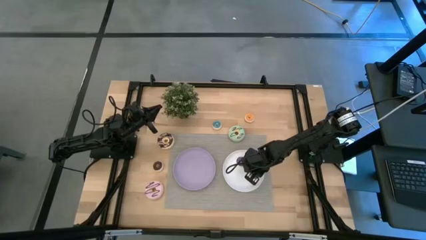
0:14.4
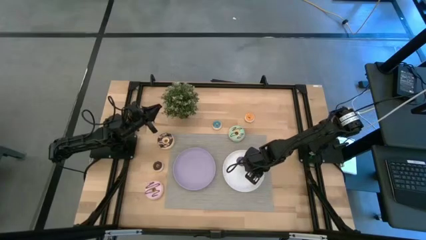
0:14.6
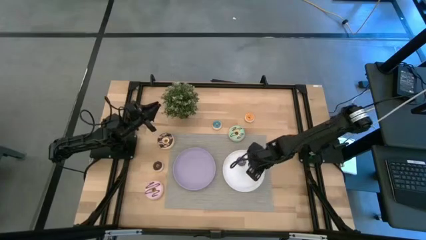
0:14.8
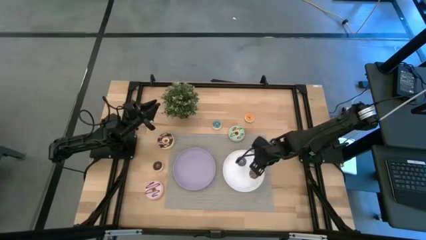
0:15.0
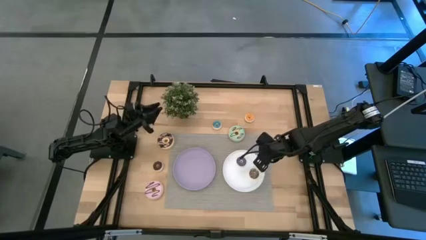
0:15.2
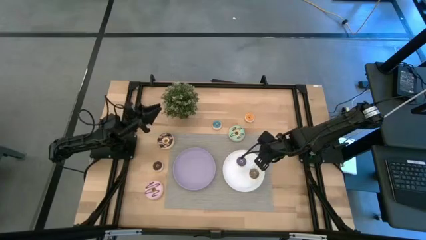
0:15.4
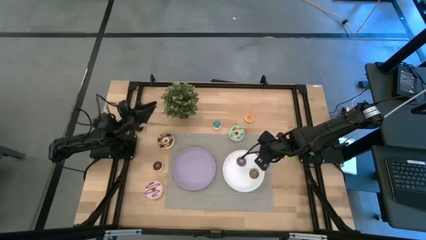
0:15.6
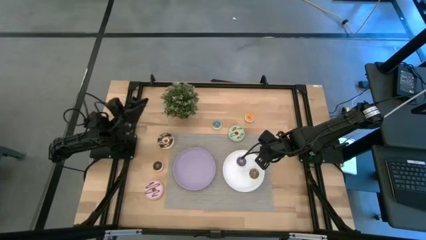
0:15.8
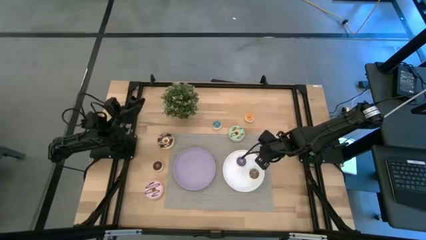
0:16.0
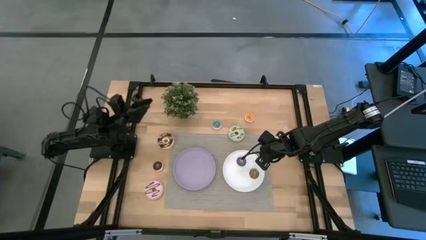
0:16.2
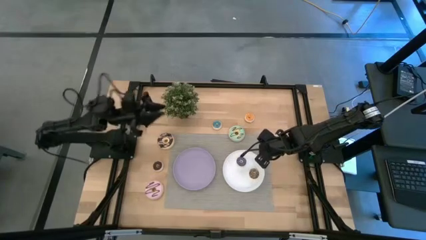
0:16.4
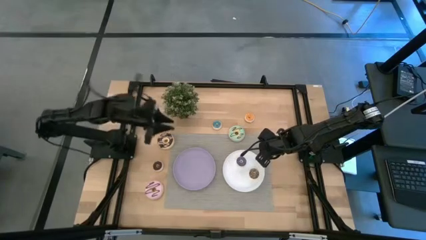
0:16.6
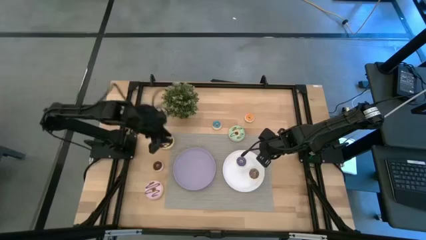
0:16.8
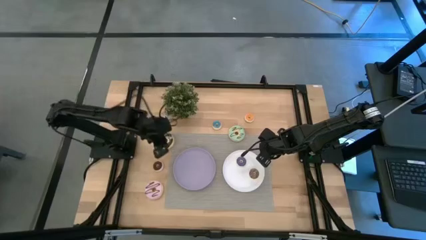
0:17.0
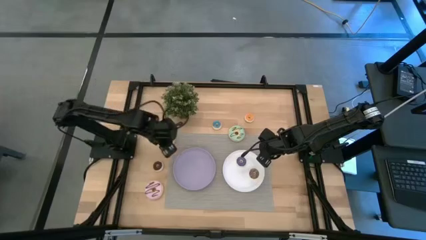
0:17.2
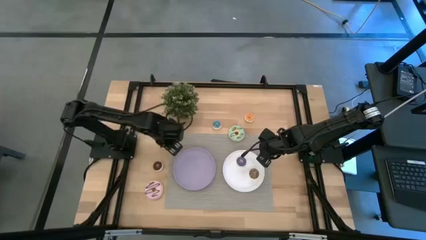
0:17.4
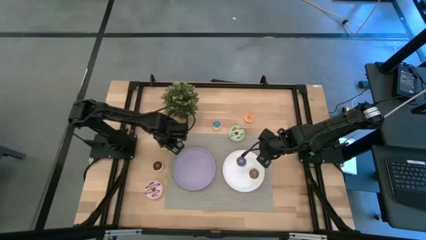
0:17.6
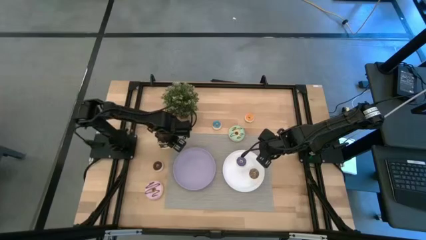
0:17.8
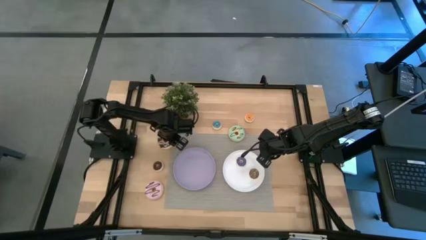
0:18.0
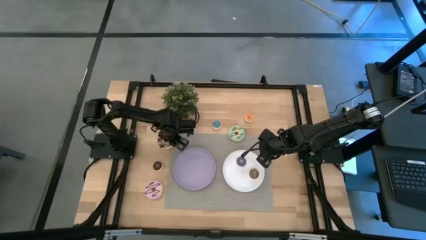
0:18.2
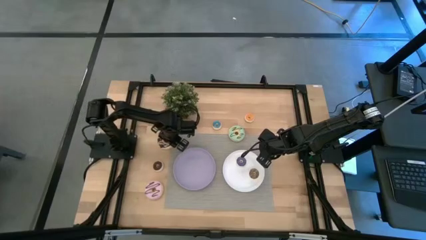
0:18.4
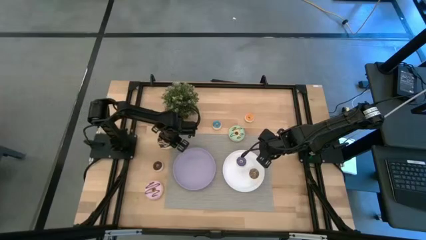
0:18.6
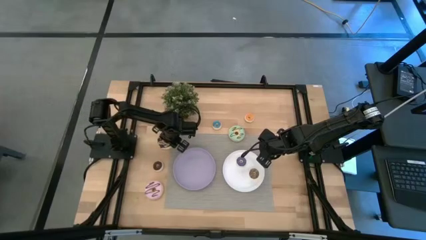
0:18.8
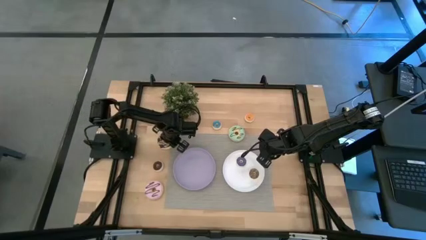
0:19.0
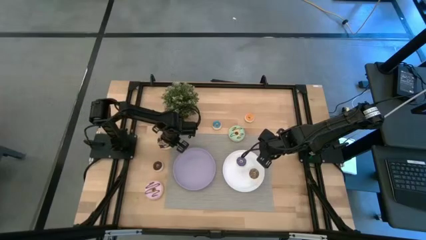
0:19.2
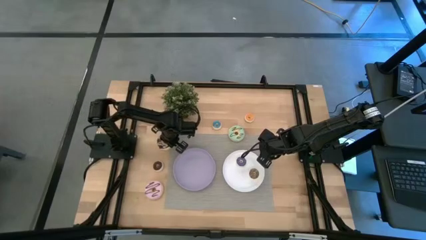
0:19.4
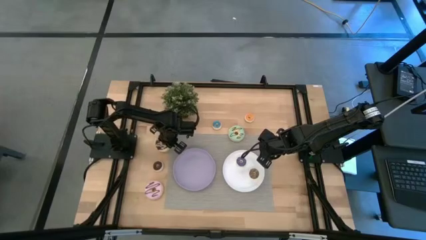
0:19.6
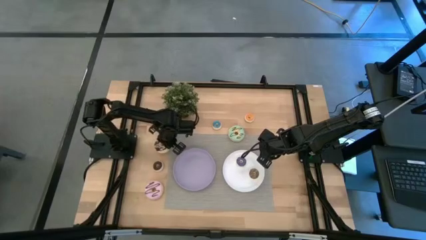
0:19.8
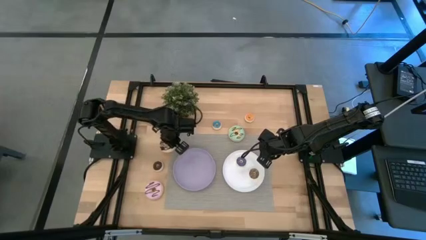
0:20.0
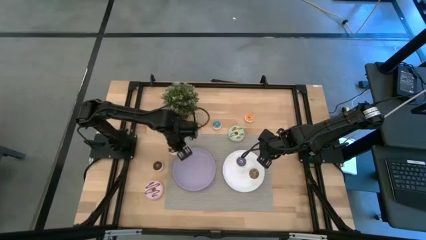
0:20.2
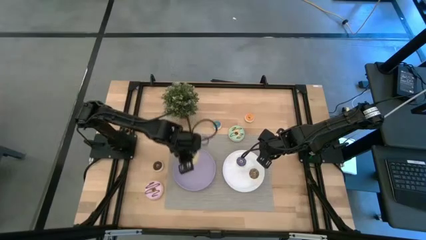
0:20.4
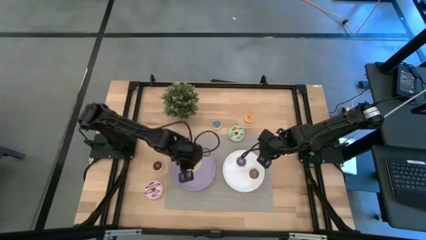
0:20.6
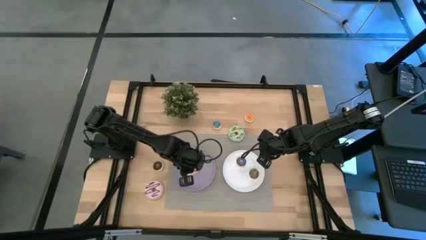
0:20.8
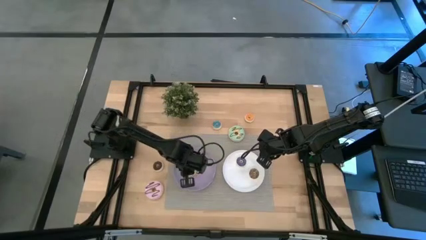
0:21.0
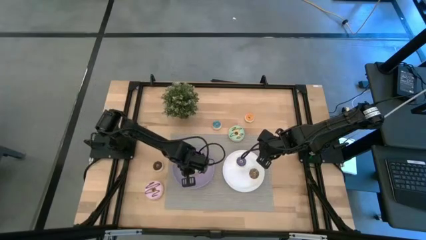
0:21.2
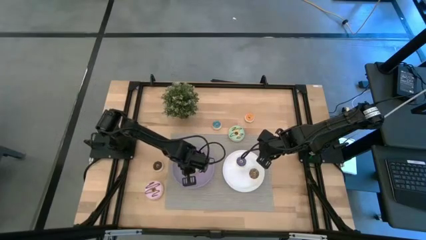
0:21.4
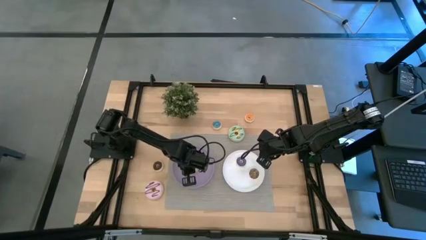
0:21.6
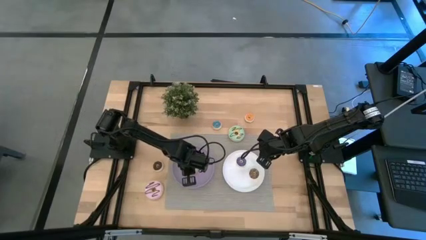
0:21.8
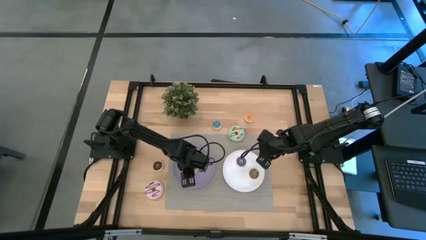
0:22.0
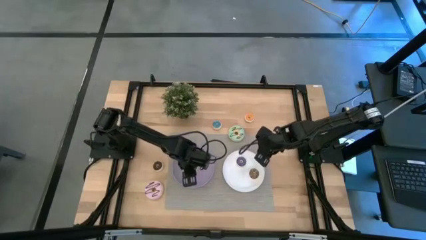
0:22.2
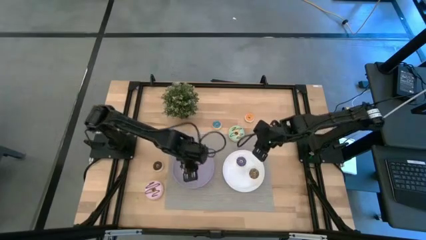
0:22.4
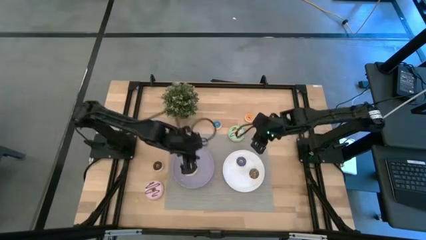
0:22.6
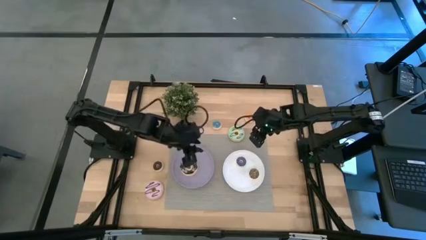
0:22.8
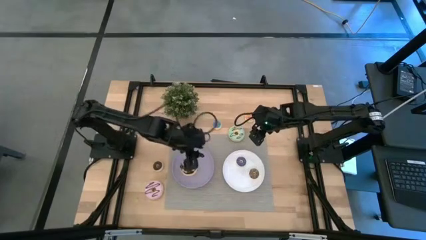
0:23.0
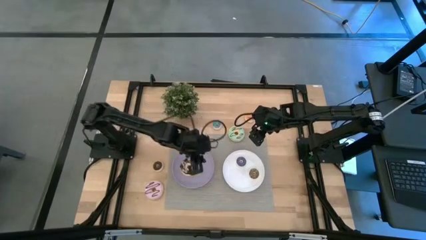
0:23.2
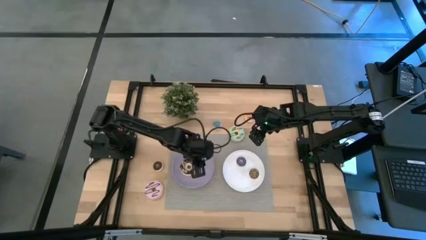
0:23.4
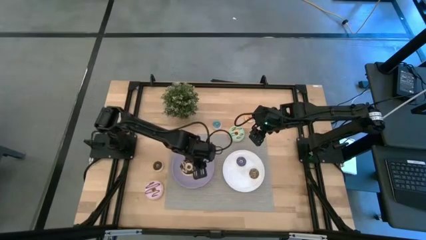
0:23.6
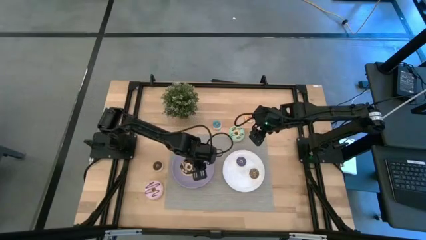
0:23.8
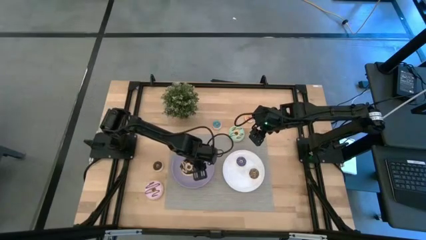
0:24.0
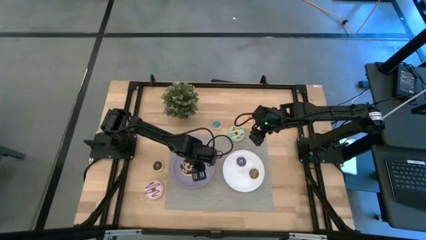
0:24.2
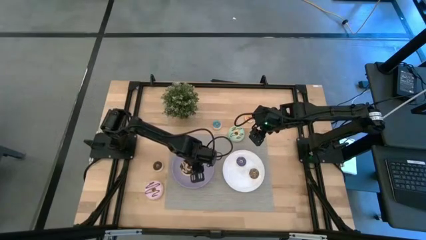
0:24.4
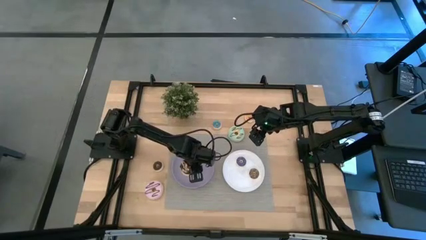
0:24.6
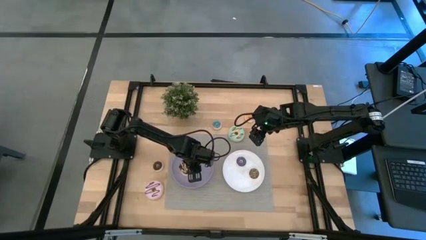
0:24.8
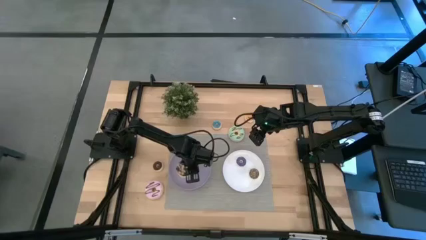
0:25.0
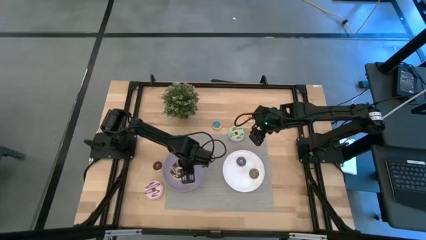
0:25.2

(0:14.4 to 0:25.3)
Task: Pick & Place donuts
Put the large black donut on the purple plate

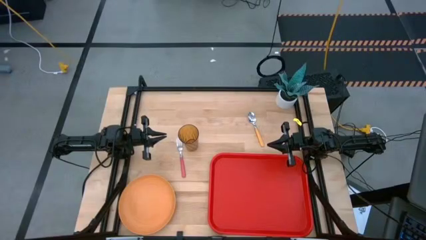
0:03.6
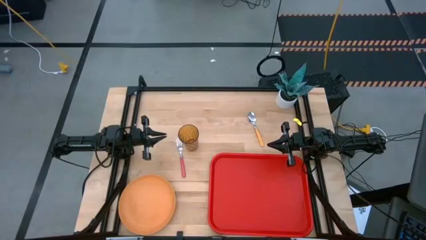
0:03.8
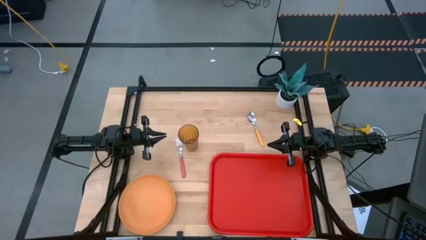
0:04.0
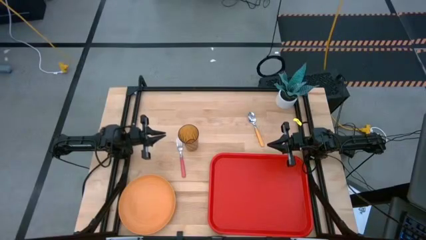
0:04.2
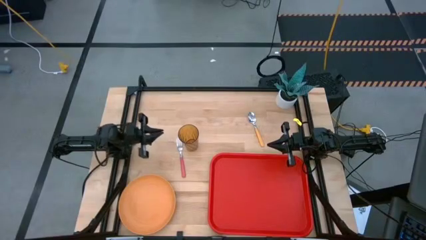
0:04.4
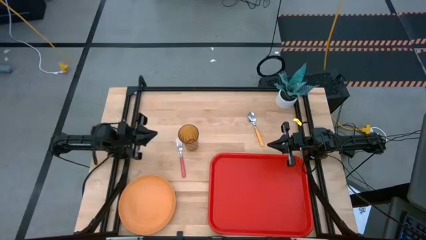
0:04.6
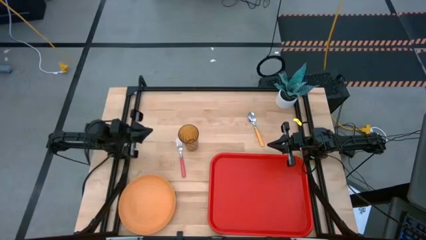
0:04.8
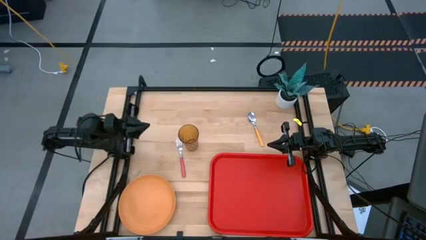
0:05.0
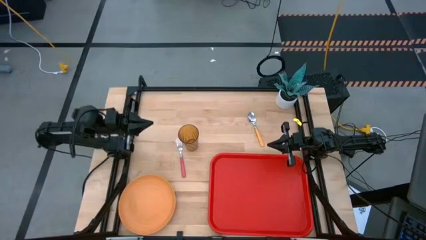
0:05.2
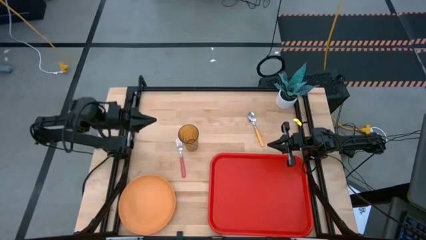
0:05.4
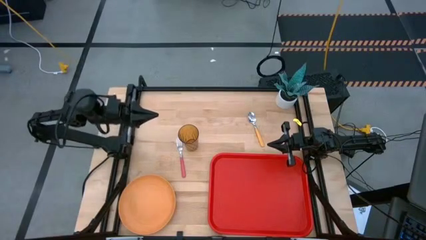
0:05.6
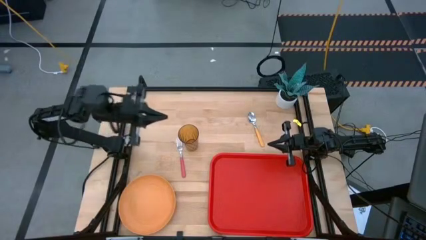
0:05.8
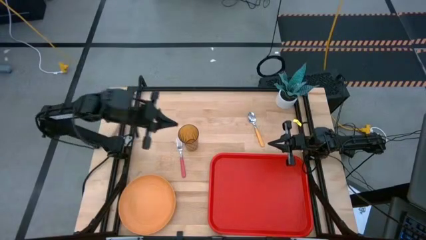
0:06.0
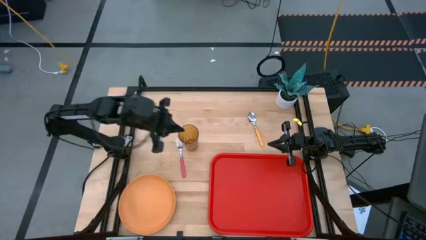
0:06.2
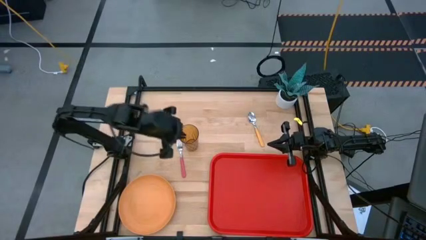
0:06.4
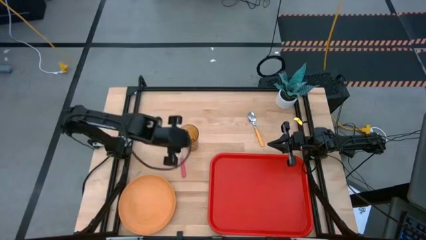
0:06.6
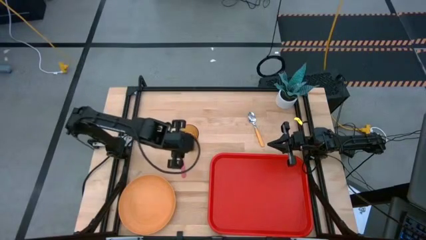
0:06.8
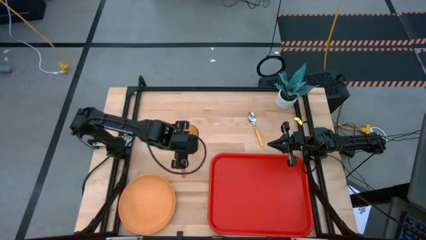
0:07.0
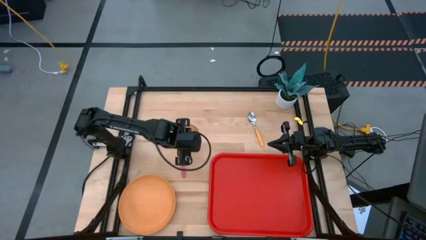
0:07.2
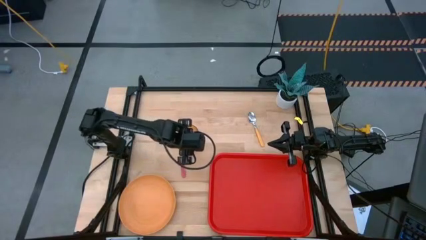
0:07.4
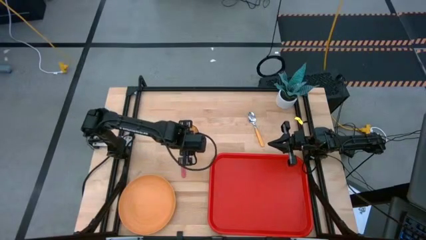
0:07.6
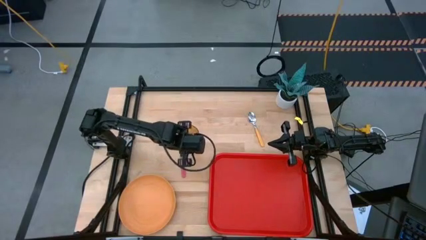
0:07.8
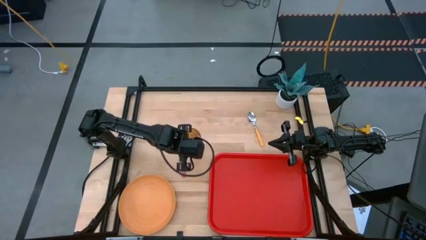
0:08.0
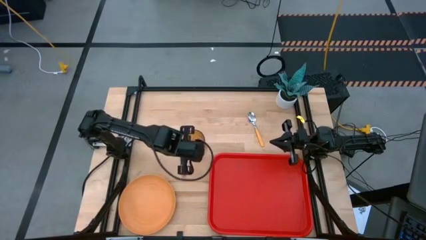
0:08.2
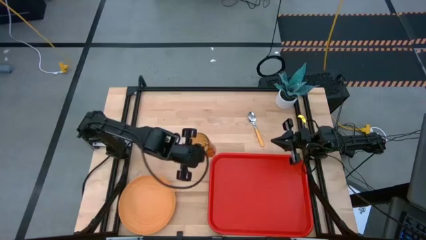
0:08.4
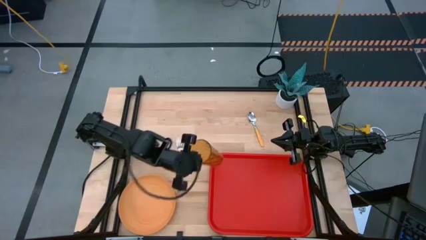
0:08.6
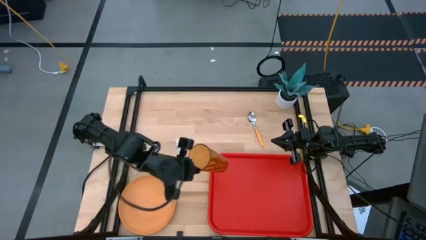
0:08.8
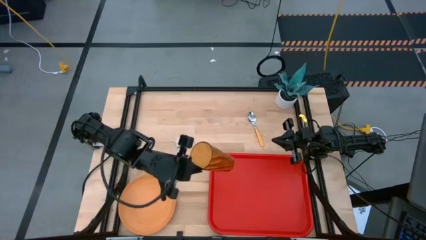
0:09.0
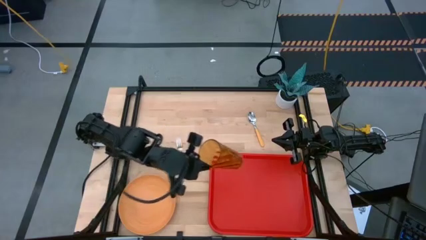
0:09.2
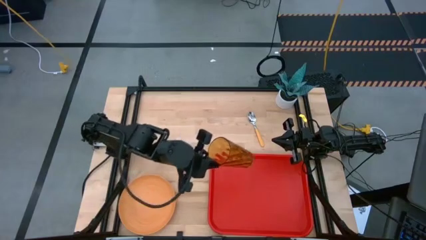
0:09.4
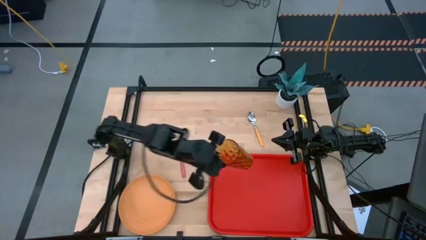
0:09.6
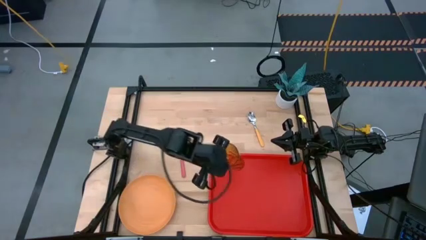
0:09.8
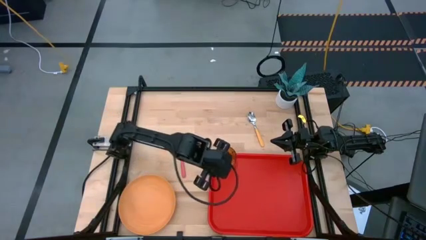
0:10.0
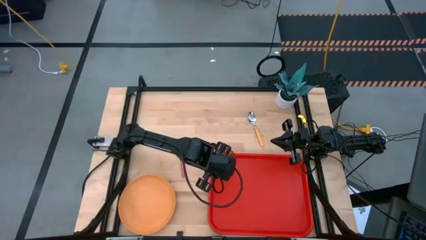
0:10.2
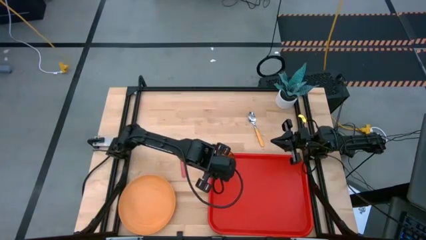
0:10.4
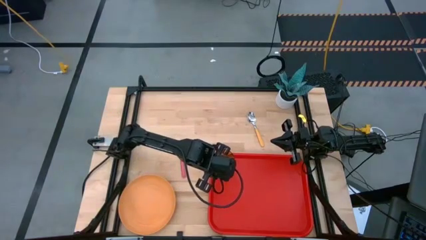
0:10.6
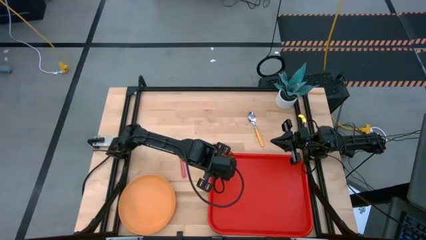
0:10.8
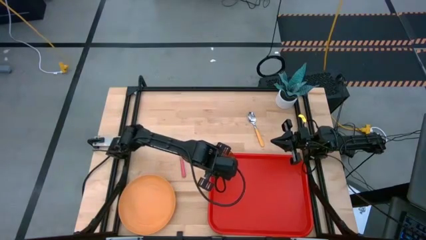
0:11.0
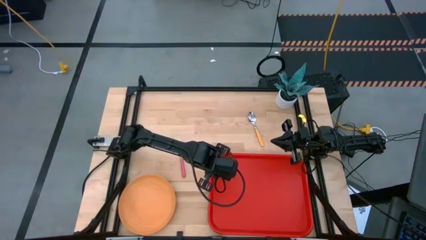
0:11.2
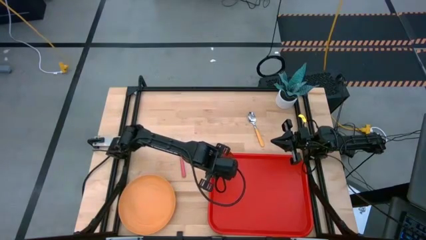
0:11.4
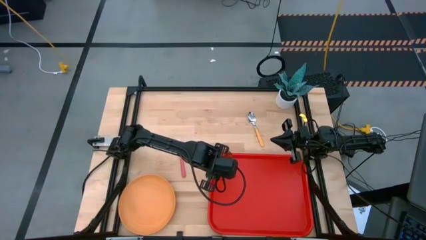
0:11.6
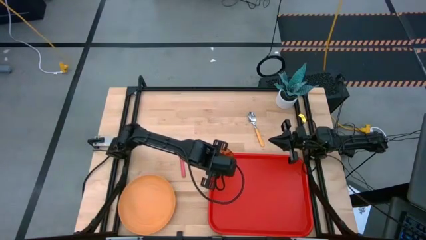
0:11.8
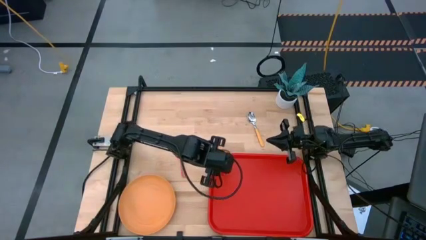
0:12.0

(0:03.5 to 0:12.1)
Task: Pick and place plate/cup/fork/spoon on tray
Put the yellow cup on the red tray
